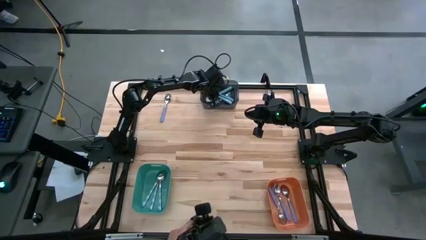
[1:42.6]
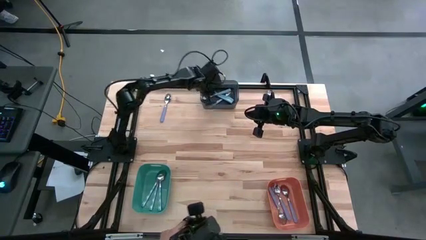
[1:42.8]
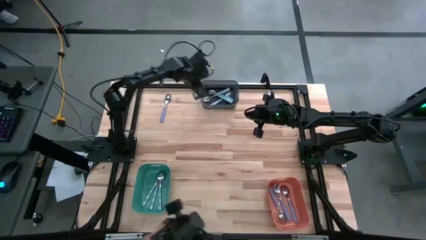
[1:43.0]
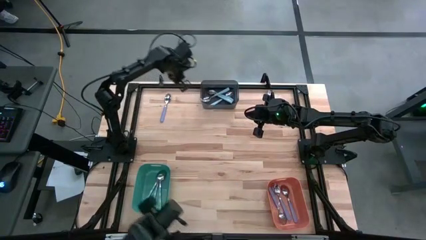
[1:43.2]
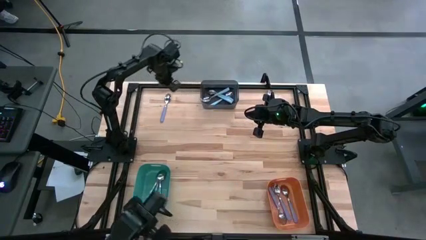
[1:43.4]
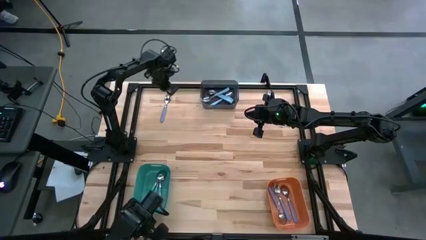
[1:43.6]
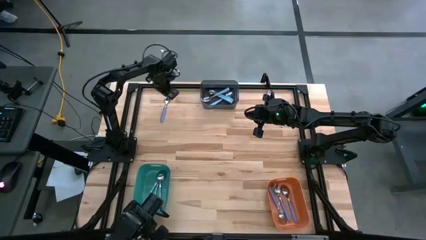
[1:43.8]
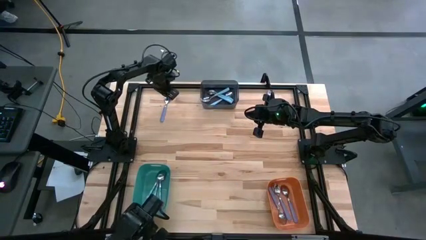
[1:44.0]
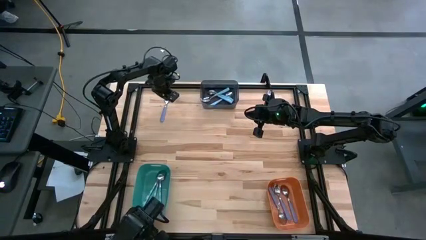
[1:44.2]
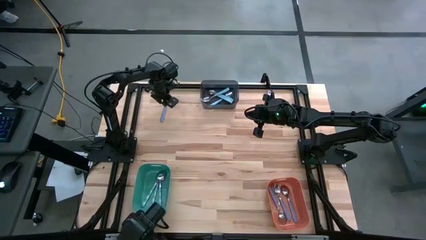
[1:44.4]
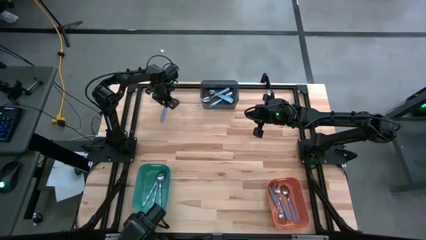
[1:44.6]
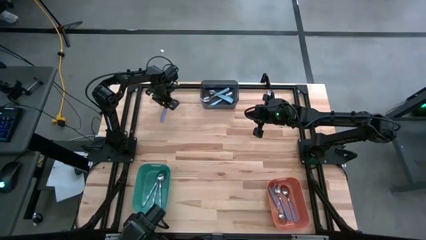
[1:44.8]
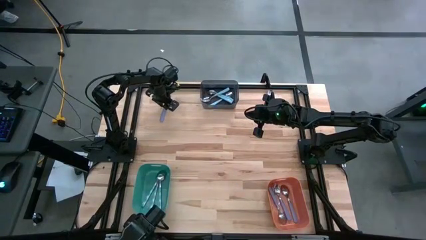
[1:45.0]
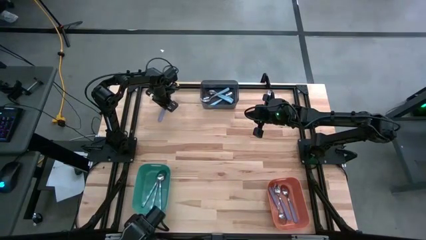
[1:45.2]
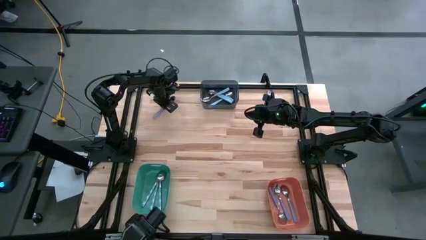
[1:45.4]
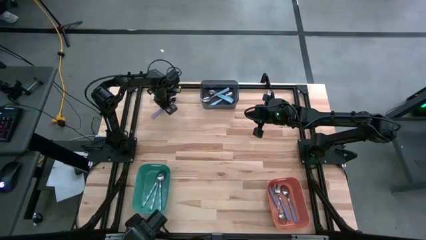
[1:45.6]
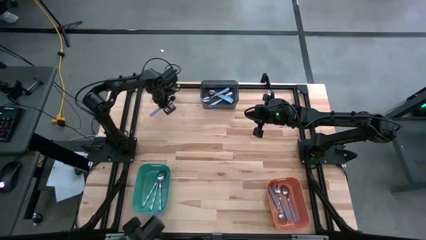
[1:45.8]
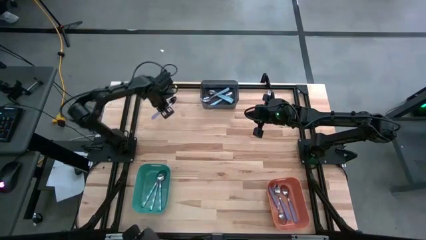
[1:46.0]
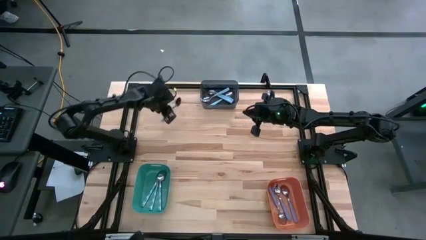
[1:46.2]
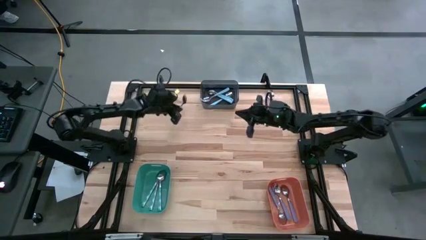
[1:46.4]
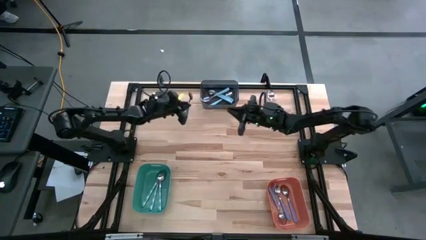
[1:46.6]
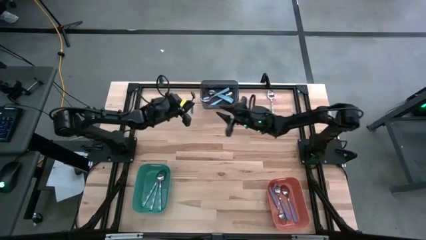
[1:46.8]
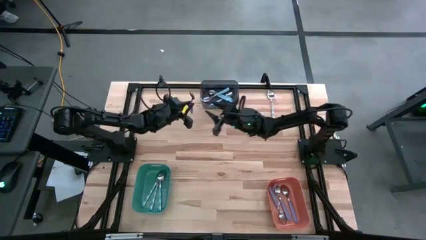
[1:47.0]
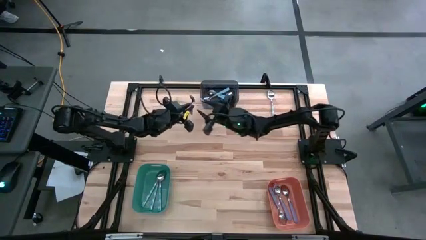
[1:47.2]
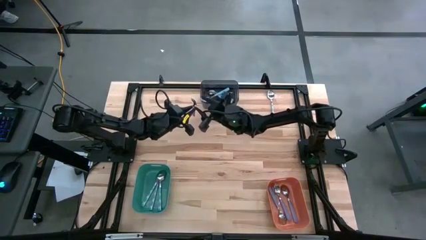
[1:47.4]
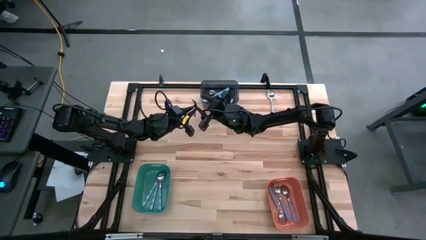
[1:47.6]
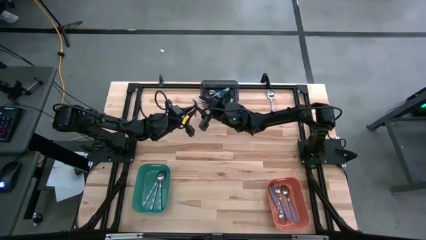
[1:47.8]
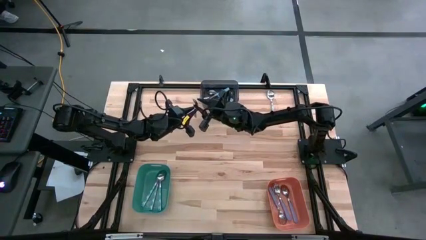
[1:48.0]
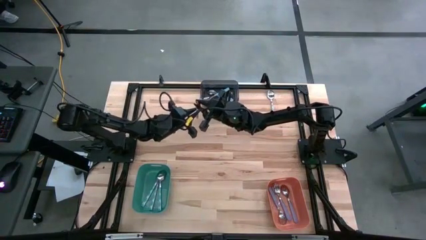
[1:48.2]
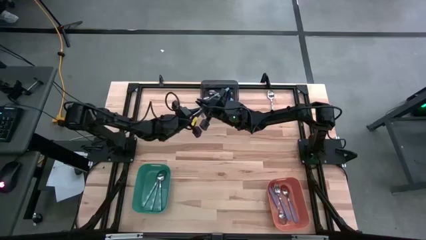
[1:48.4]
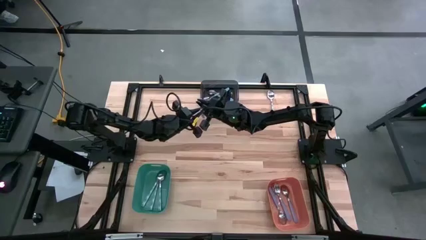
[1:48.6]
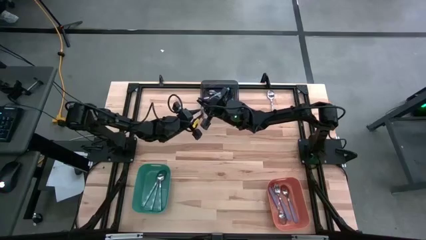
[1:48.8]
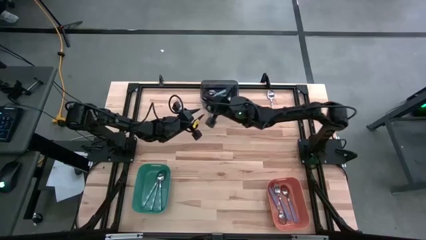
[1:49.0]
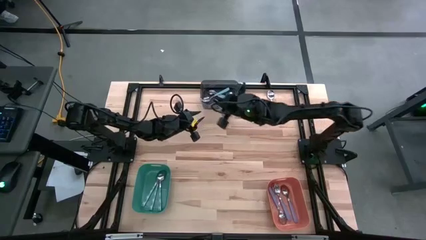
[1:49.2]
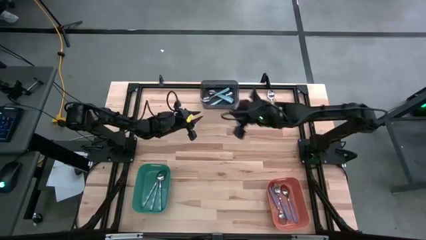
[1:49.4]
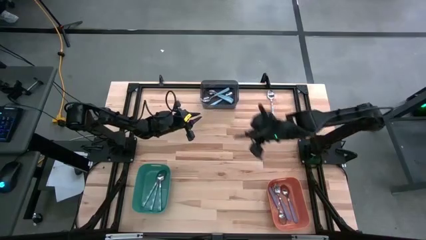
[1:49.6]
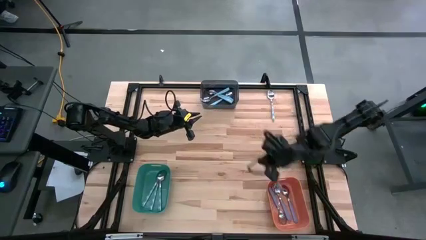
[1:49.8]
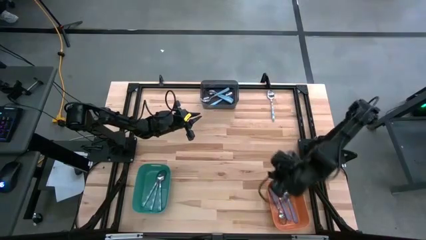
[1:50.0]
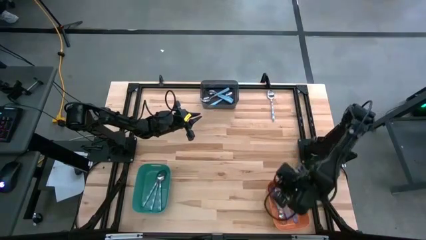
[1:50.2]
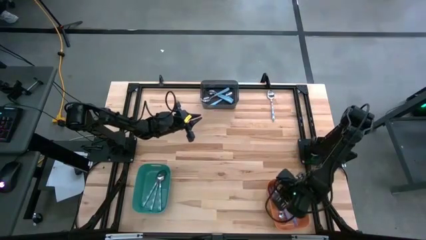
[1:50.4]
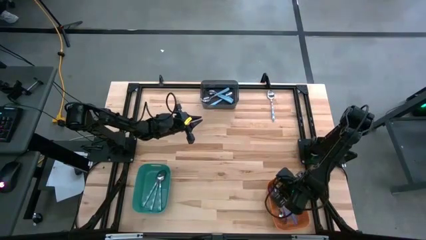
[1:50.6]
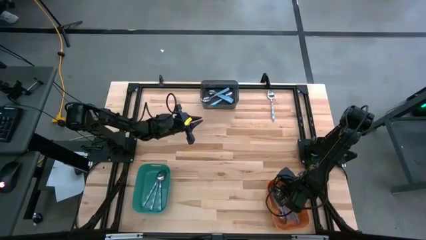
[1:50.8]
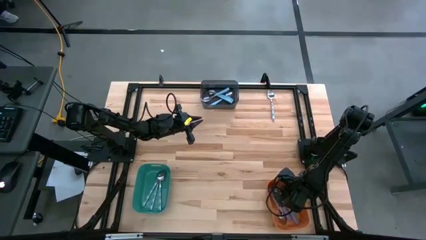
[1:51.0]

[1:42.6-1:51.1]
Task: Sort silverware by color (type)
Put the purple spoon into the orange bin

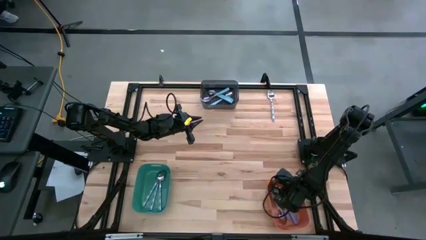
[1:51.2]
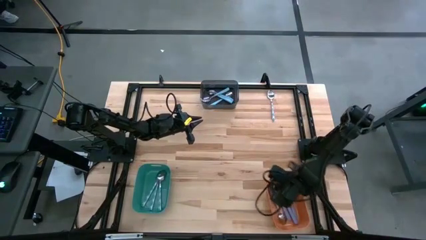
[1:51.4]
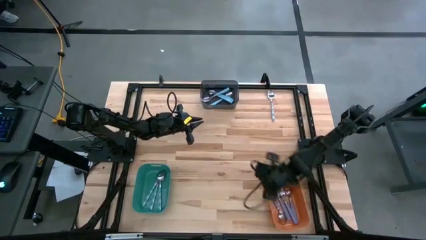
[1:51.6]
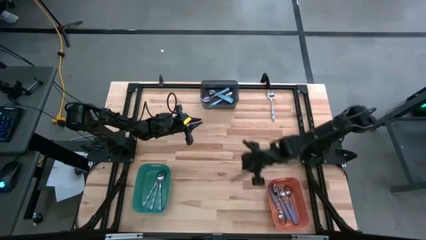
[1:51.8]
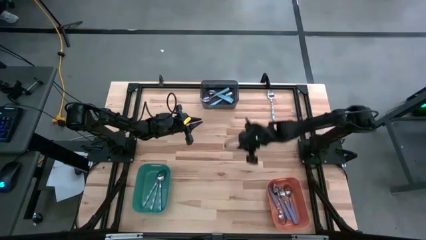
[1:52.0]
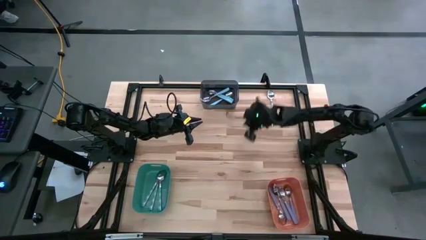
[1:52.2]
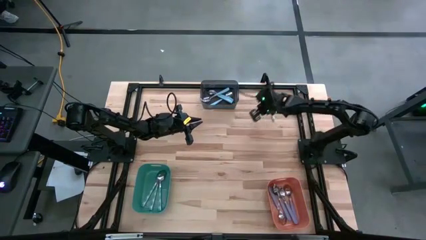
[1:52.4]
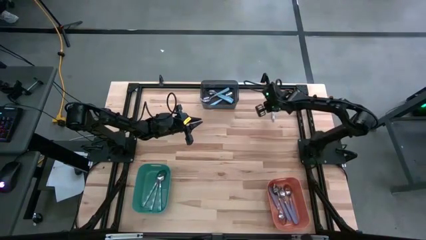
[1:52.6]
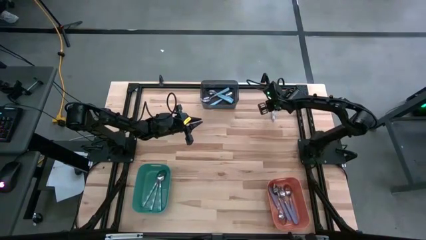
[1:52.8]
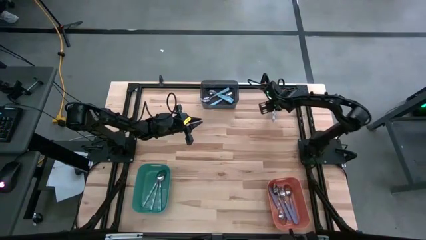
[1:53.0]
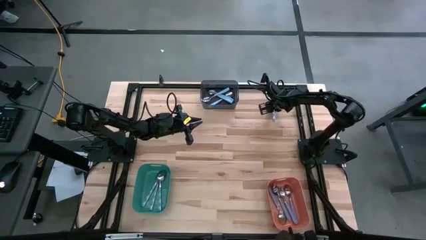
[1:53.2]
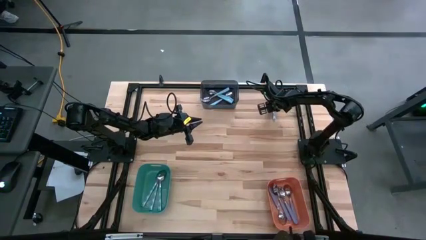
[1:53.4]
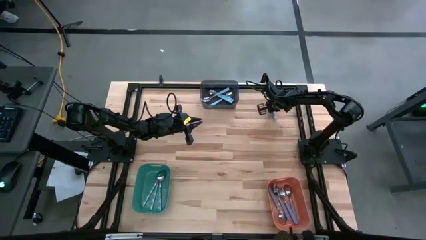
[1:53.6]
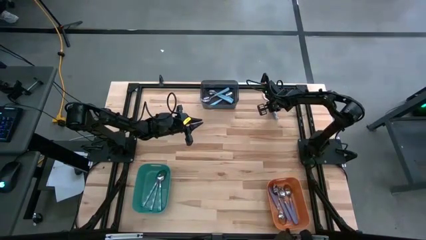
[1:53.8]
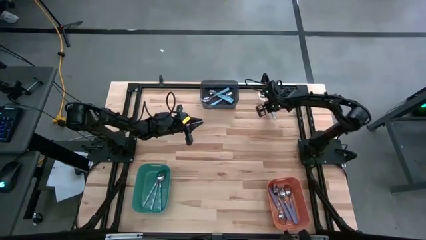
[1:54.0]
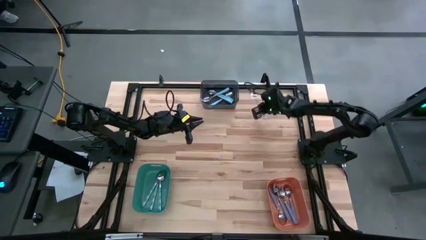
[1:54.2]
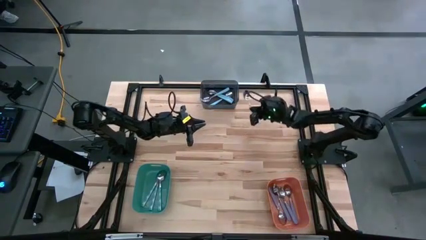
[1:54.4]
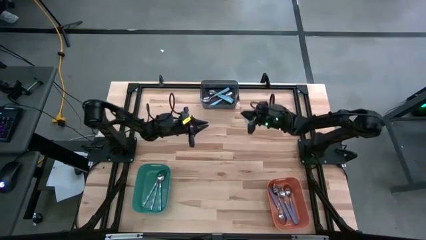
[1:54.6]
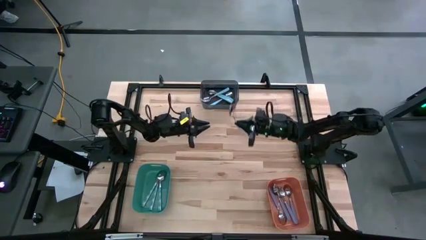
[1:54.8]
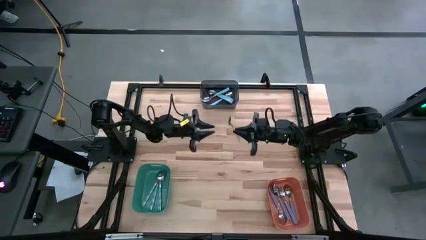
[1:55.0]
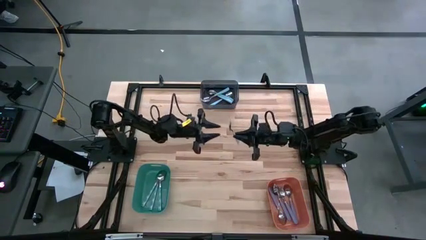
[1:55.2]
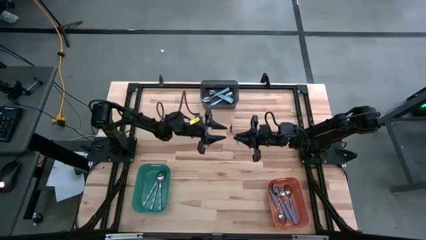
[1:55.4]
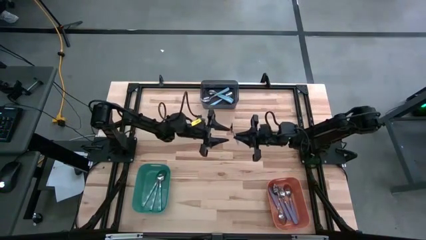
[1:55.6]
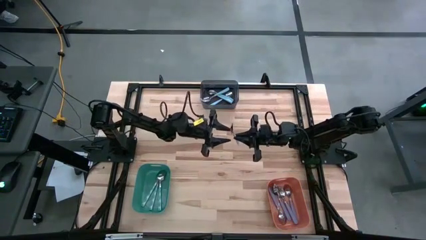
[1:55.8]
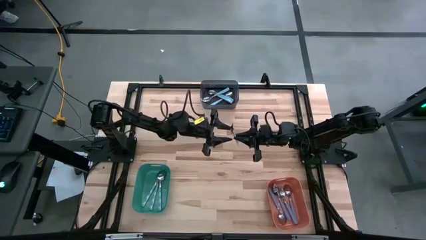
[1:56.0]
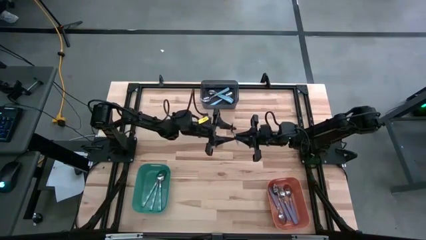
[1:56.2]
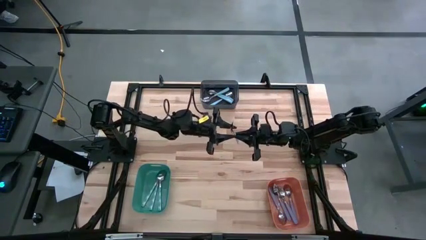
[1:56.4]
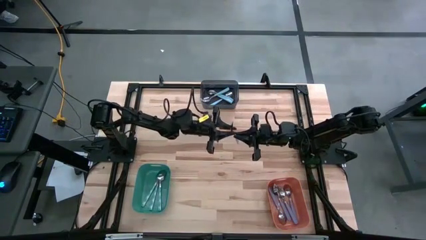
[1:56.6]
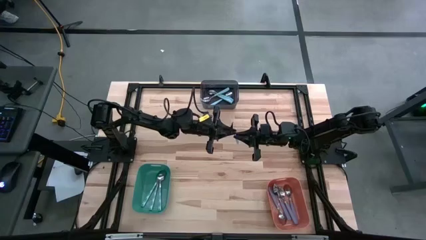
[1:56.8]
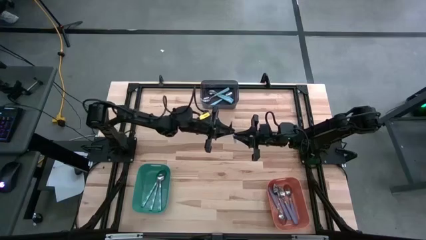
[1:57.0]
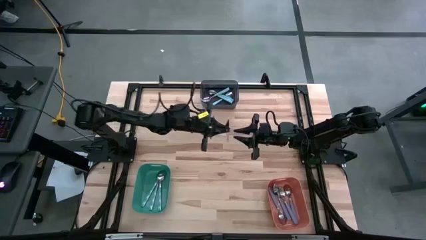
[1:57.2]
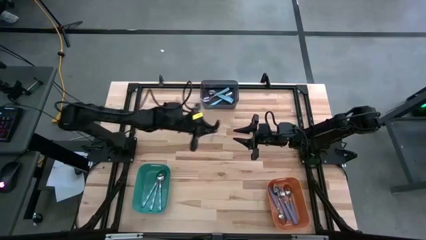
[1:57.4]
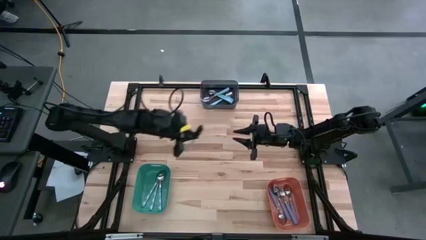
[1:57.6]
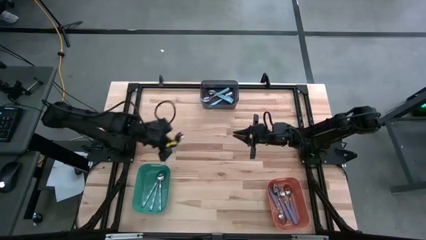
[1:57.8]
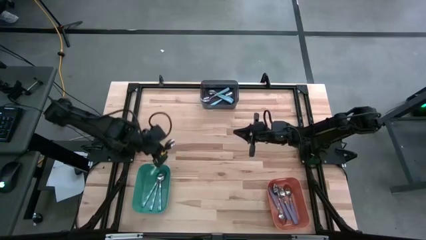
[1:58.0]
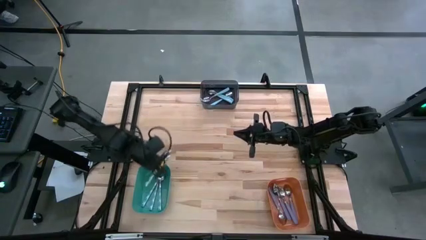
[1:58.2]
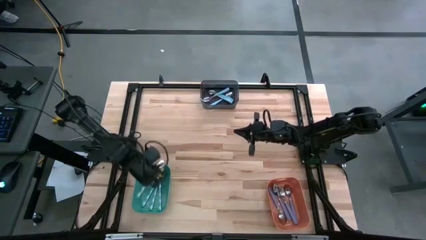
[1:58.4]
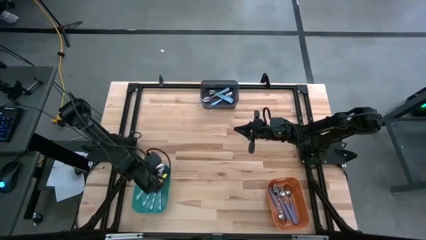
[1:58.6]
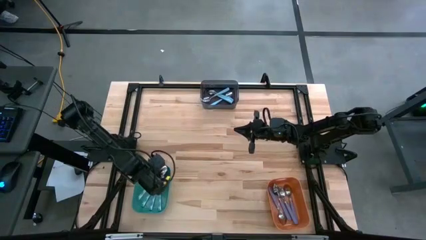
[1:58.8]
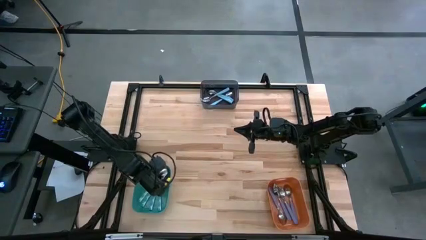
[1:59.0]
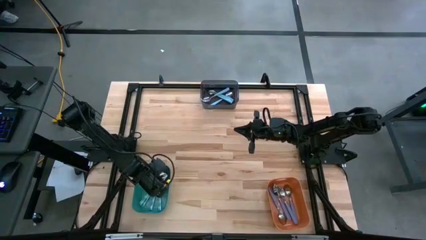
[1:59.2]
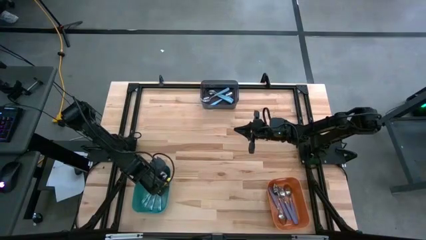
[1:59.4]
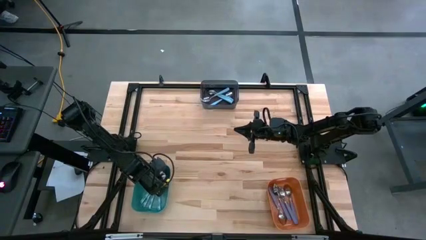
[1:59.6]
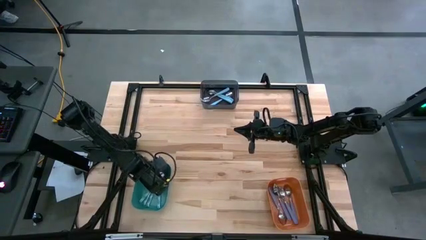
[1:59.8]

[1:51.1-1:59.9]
Put the white and blue spoon into the blue bin
